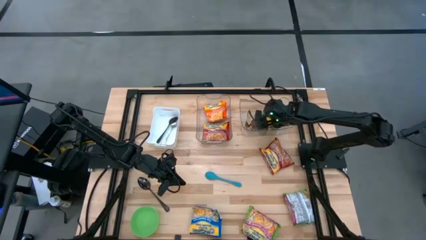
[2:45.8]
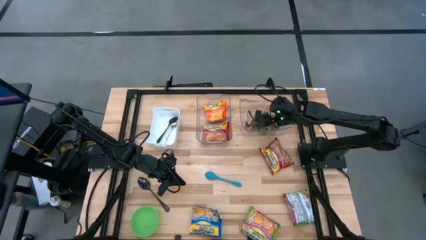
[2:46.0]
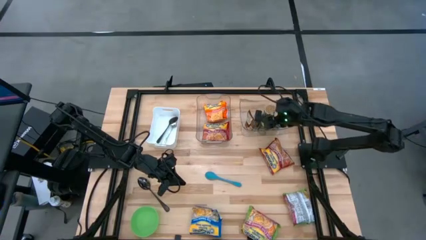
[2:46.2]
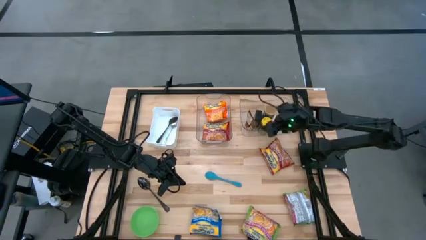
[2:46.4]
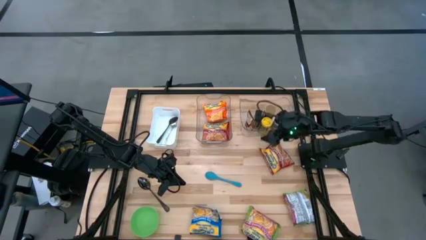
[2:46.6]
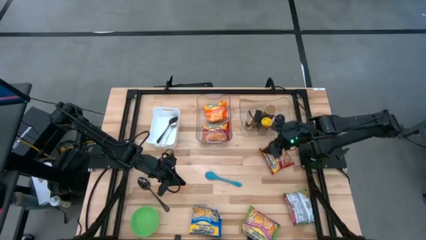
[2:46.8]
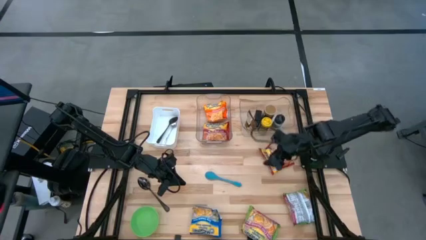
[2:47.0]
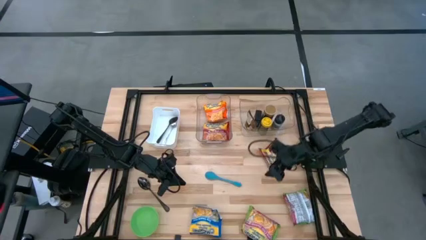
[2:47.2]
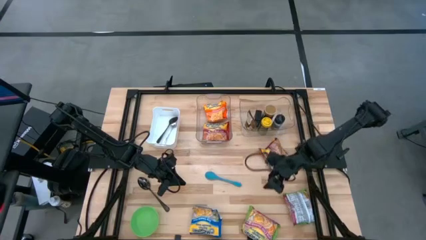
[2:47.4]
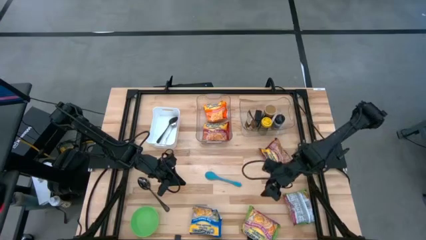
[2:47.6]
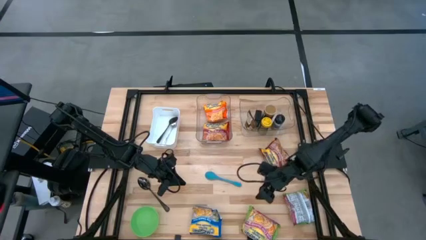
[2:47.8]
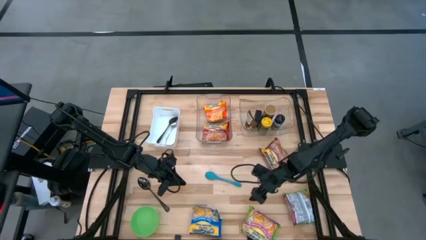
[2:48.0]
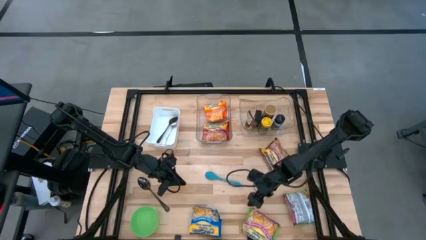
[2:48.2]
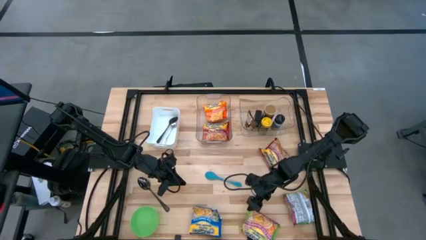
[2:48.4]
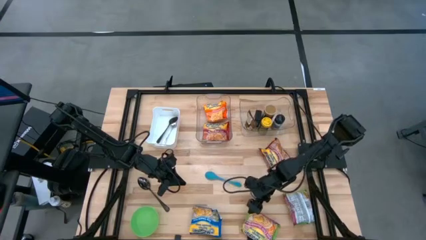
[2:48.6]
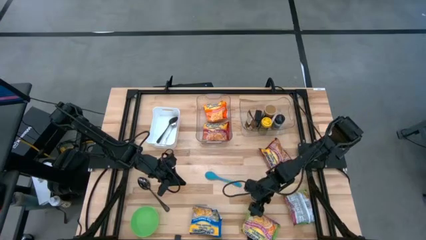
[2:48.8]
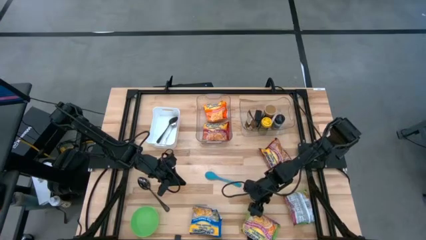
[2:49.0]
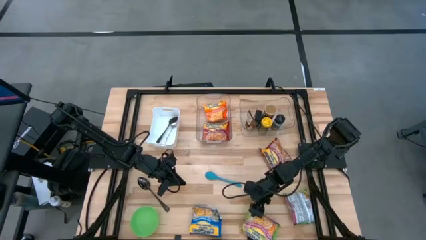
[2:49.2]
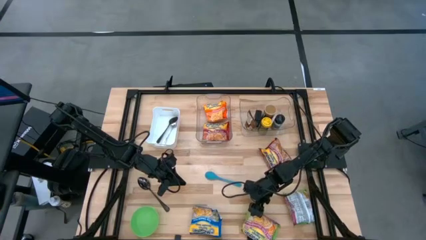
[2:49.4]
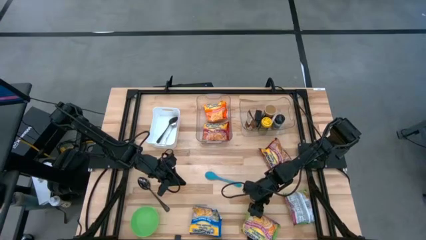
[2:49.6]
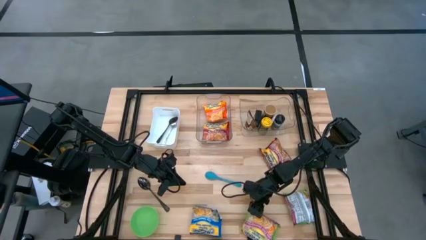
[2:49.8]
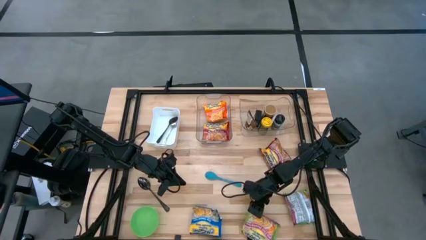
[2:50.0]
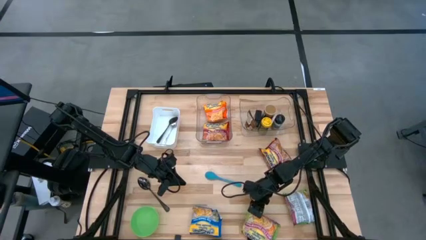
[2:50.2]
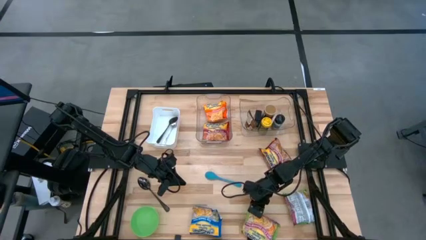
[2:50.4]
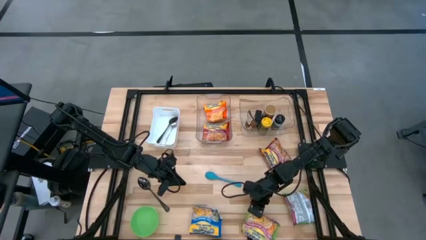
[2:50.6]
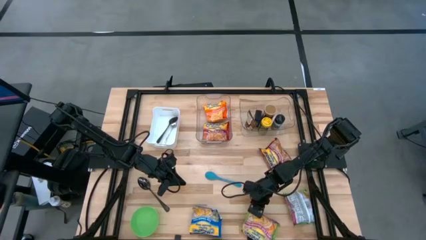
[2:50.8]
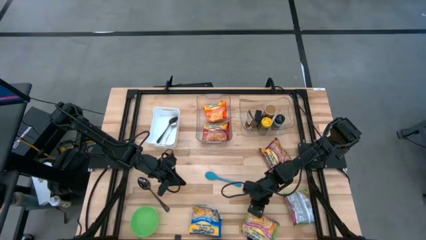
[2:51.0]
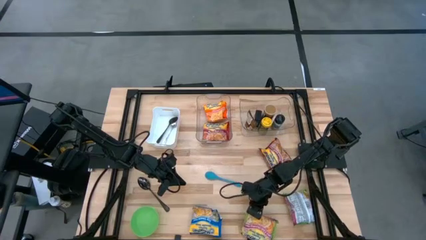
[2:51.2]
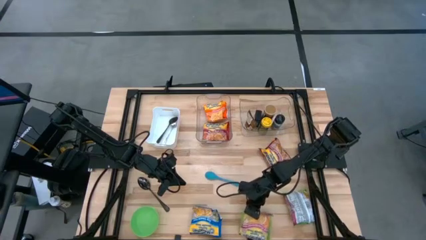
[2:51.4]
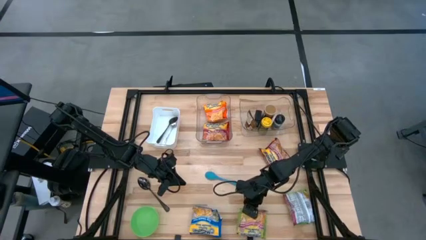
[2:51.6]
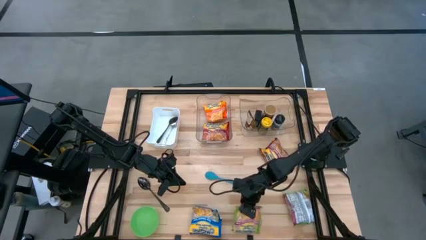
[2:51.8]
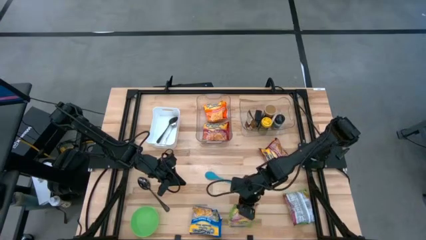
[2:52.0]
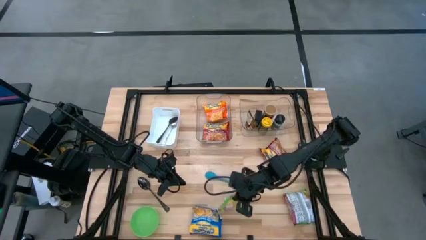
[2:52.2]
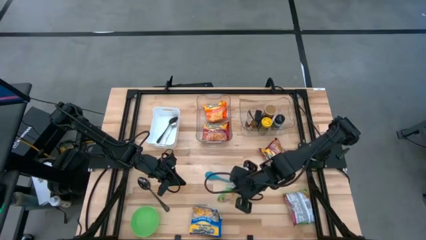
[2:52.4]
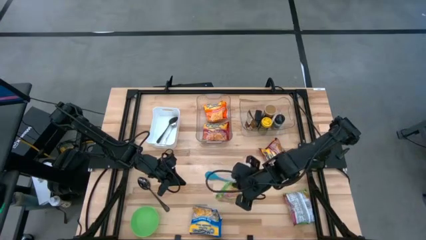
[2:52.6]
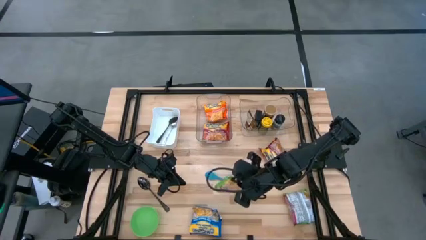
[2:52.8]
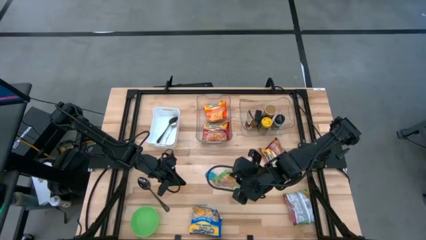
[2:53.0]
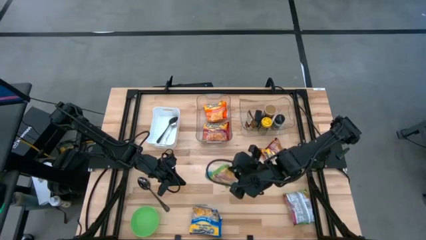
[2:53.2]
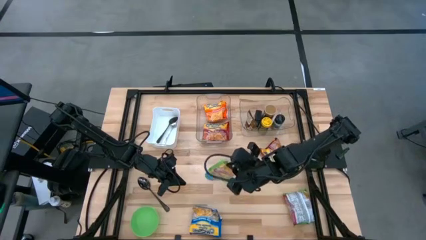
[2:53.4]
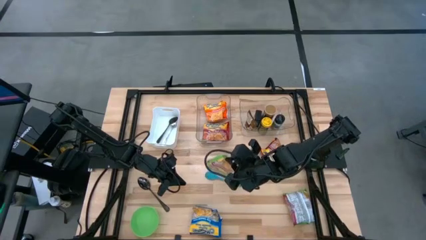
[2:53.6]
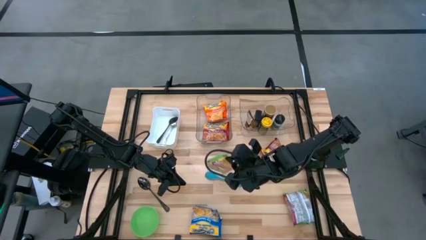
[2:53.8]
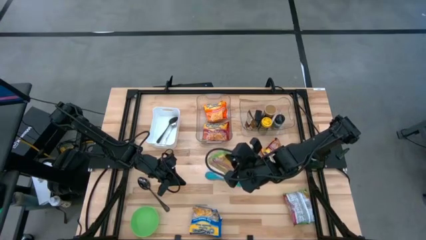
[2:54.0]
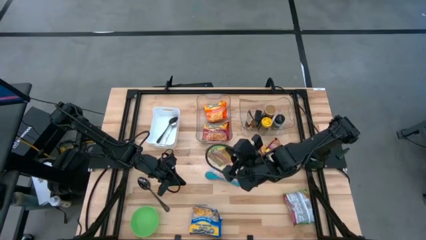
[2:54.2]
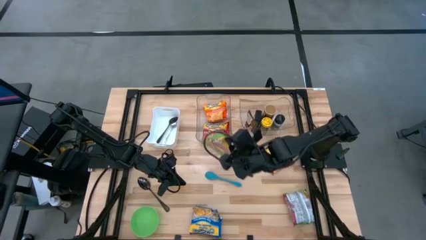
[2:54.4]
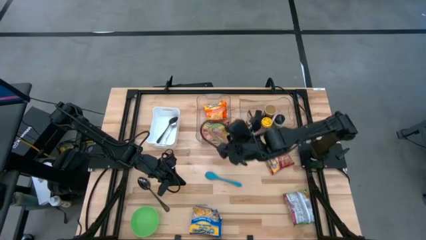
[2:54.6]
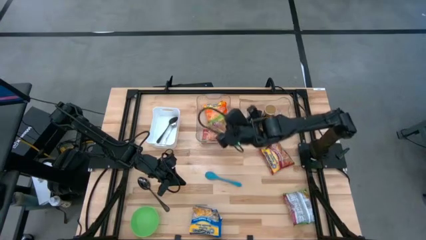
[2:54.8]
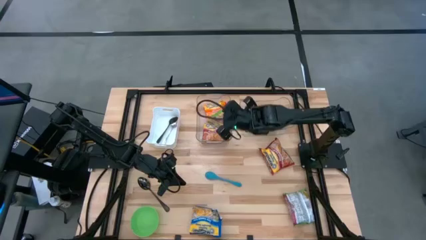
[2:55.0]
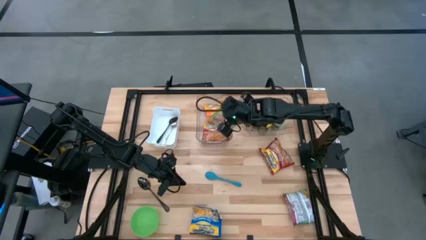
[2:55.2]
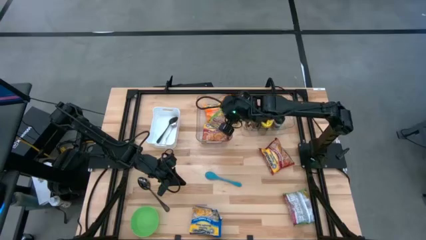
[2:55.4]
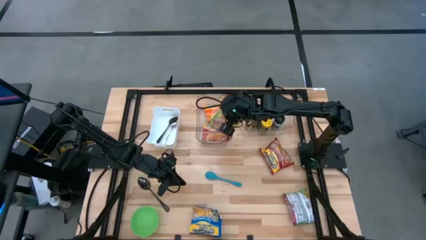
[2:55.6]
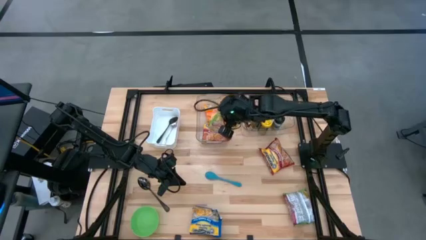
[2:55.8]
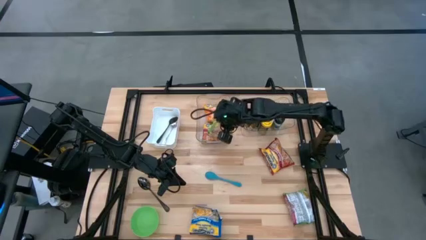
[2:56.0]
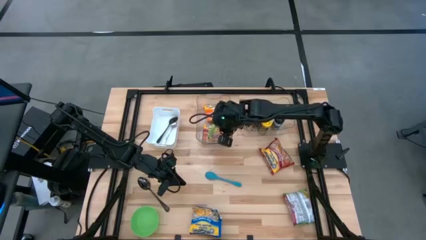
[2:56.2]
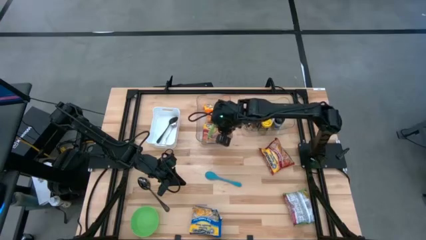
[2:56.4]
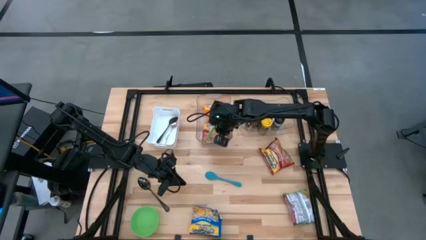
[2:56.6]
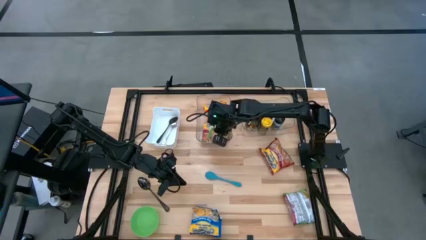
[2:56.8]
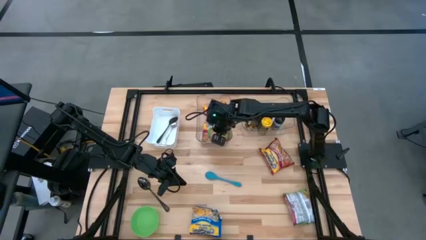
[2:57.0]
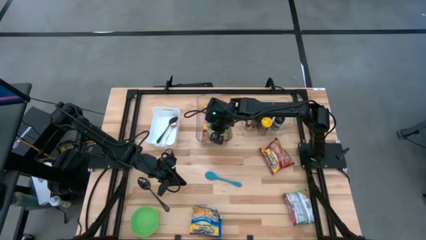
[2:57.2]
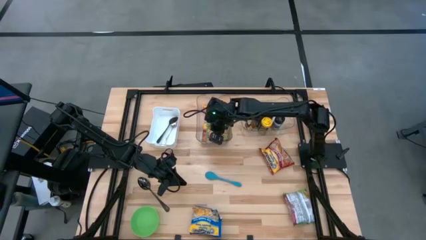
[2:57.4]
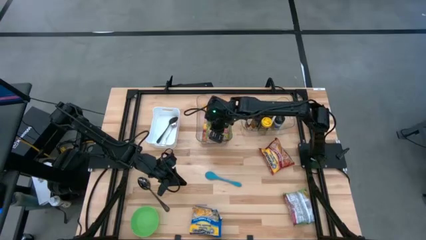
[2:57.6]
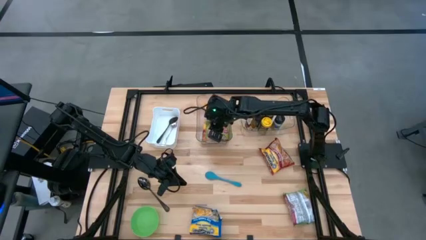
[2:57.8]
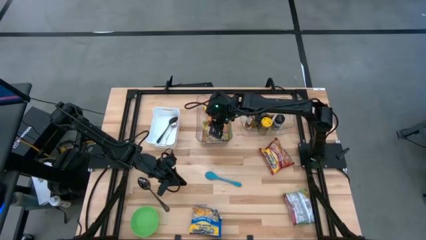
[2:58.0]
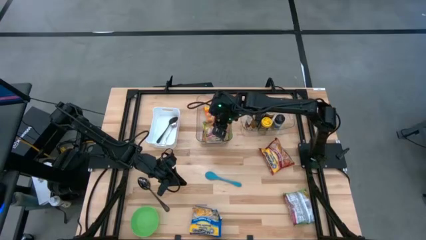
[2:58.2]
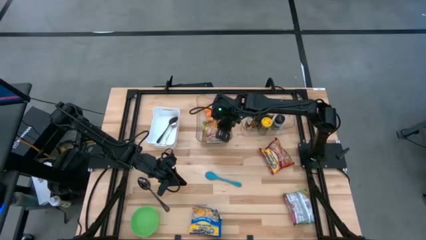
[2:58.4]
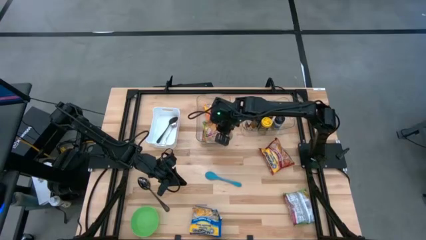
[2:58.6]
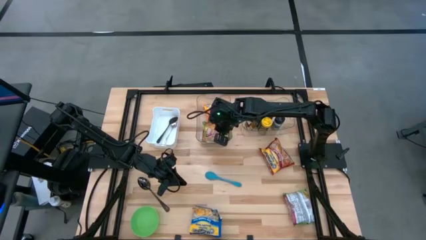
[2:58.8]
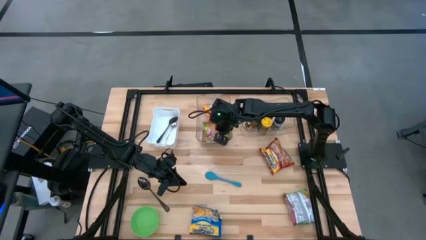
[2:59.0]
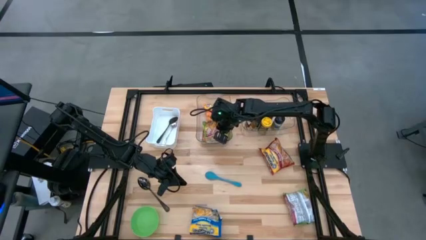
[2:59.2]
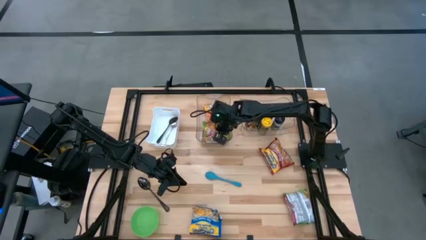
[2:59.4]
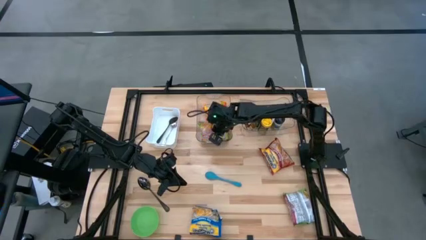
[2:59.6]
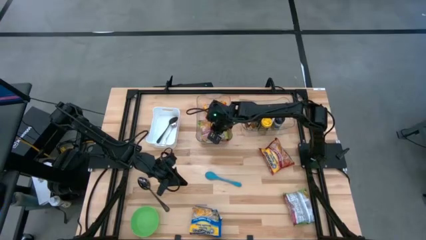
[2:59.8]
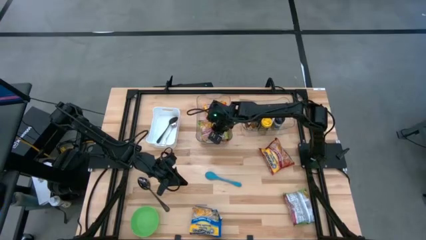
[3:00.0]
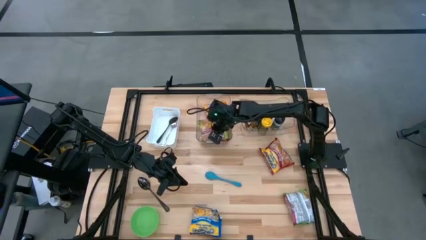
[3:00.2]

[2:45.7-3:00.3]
Task: Pick & Place Food Item
Put the left green noodle pack into the left transparent bin
